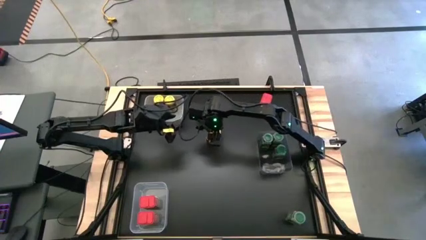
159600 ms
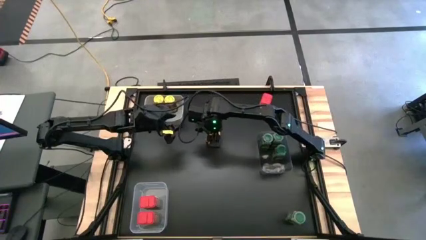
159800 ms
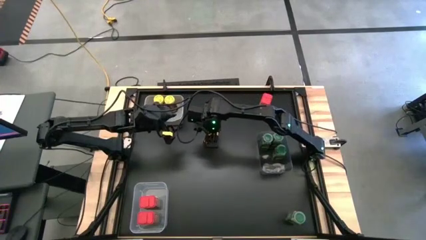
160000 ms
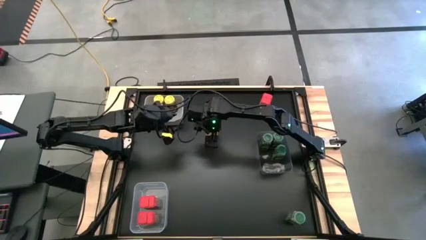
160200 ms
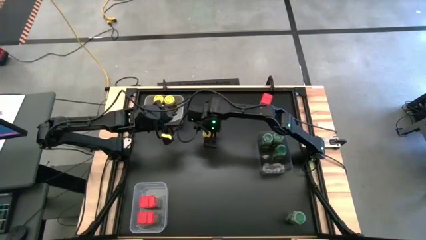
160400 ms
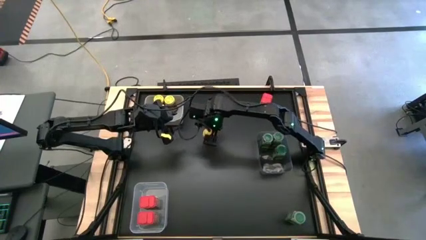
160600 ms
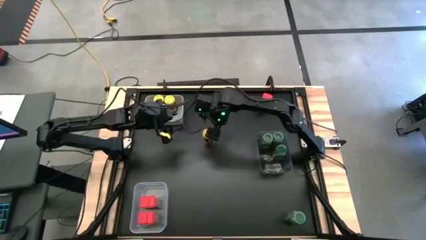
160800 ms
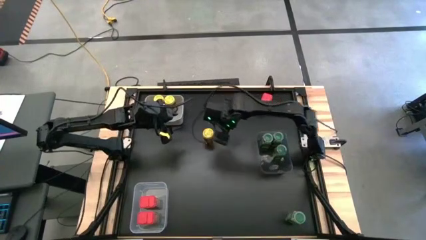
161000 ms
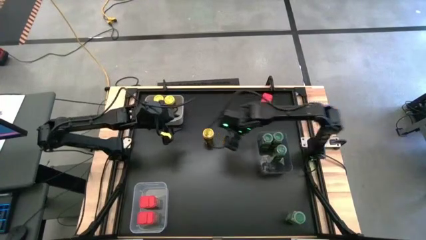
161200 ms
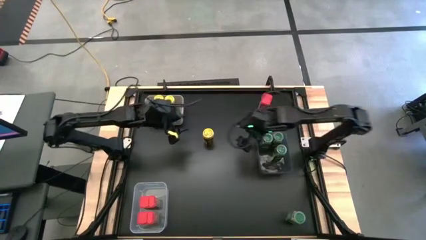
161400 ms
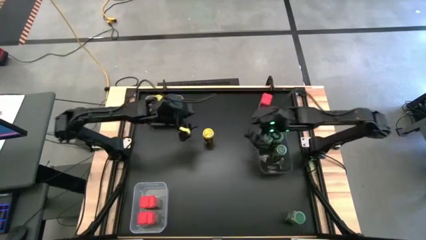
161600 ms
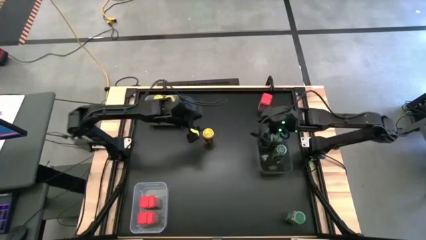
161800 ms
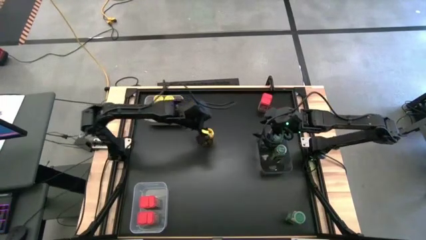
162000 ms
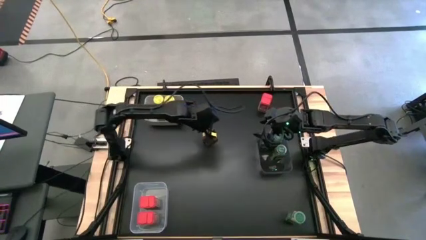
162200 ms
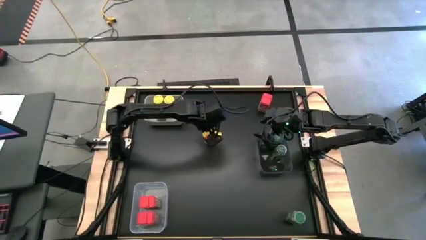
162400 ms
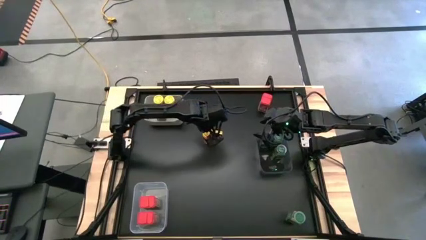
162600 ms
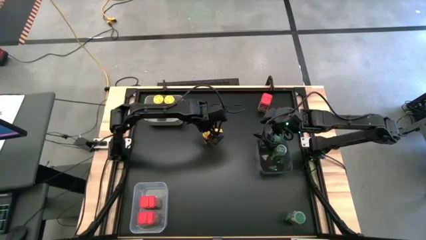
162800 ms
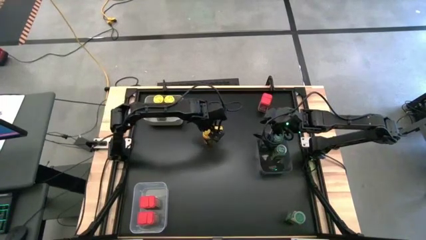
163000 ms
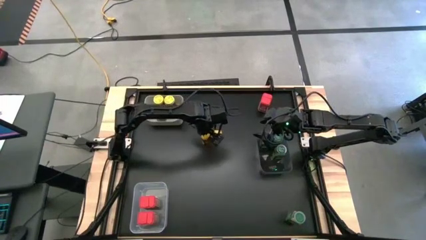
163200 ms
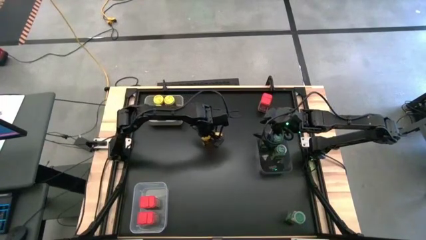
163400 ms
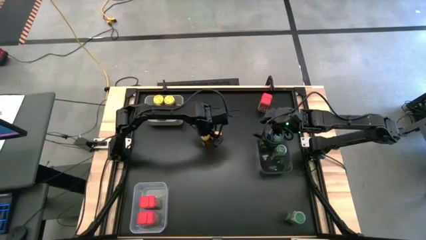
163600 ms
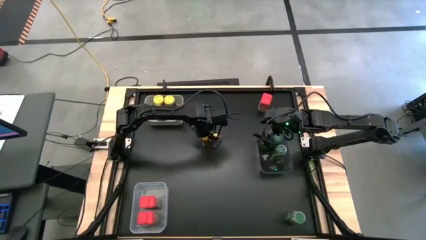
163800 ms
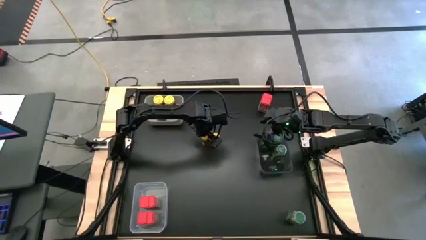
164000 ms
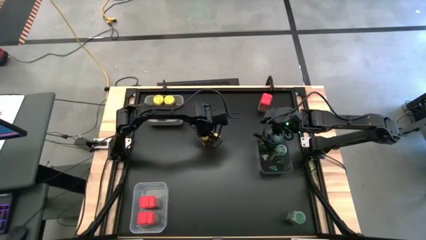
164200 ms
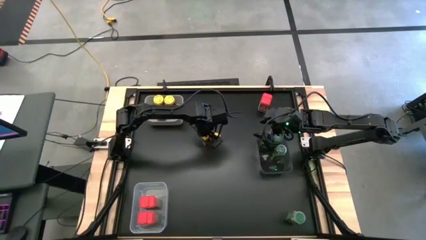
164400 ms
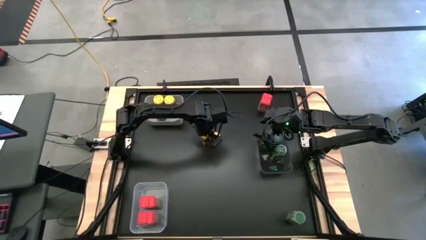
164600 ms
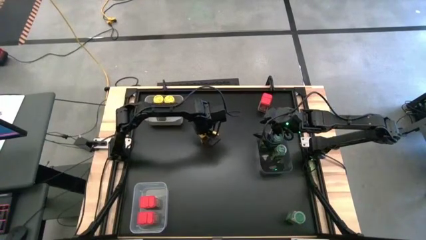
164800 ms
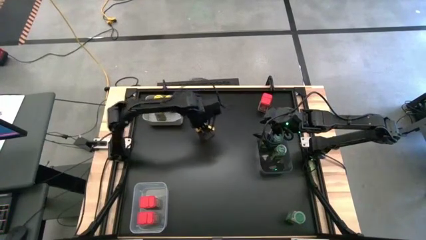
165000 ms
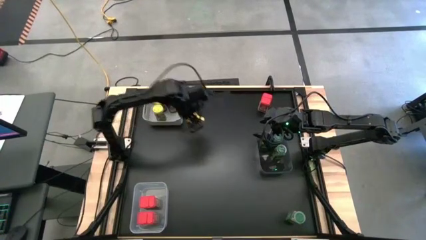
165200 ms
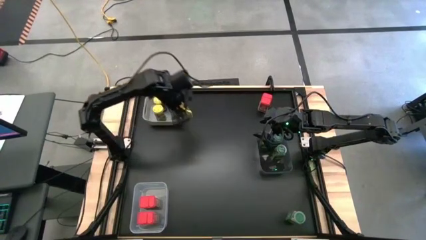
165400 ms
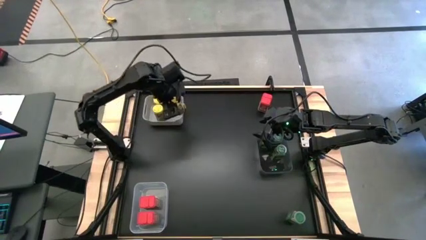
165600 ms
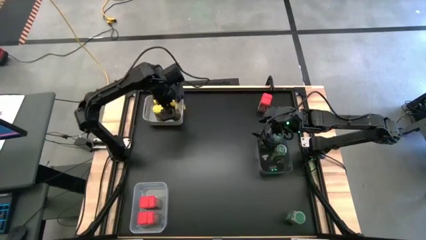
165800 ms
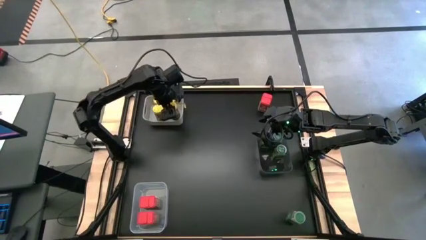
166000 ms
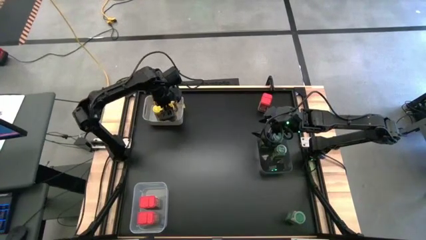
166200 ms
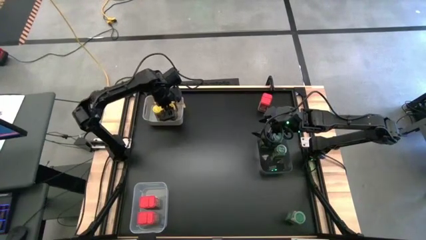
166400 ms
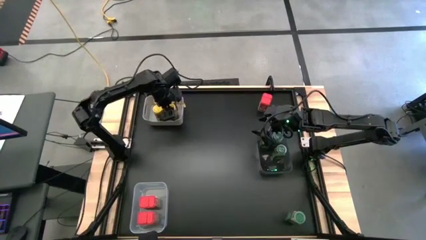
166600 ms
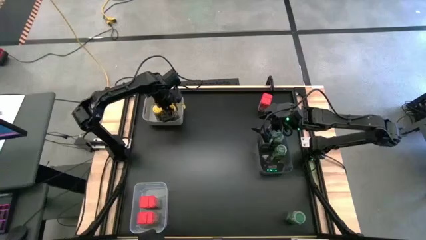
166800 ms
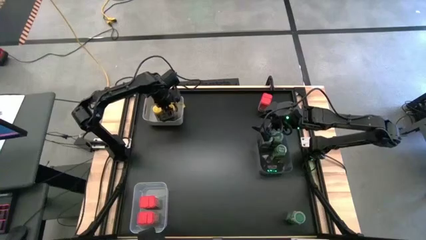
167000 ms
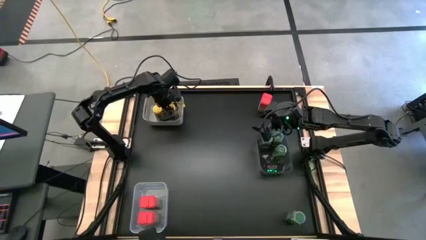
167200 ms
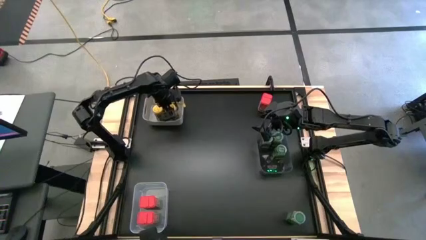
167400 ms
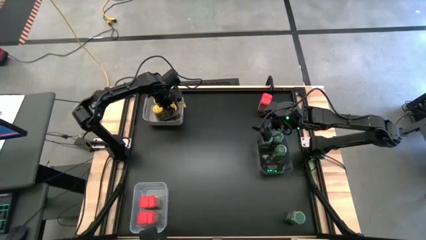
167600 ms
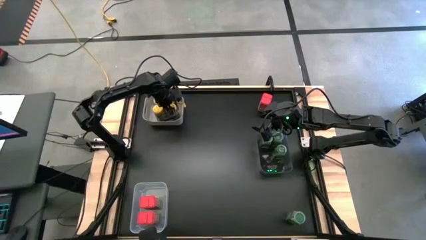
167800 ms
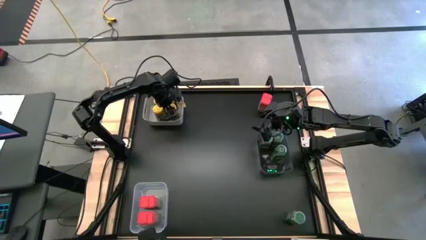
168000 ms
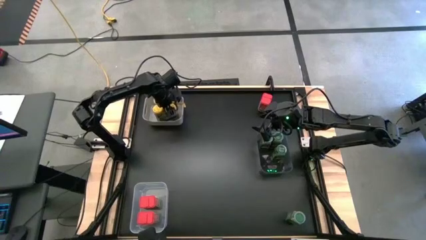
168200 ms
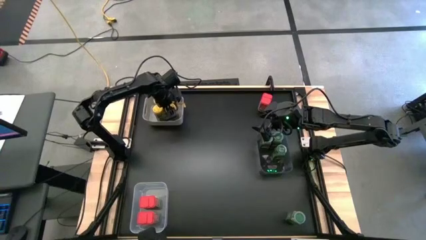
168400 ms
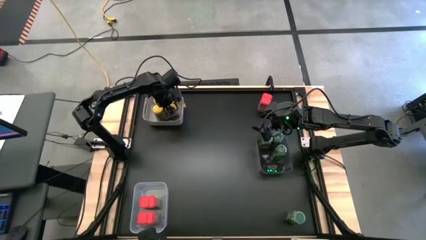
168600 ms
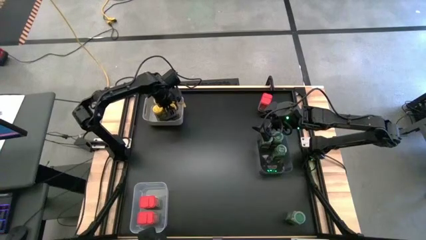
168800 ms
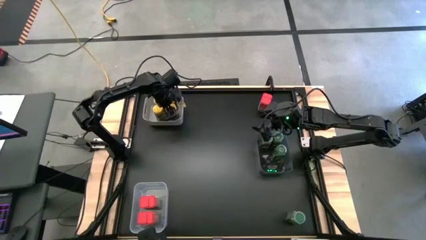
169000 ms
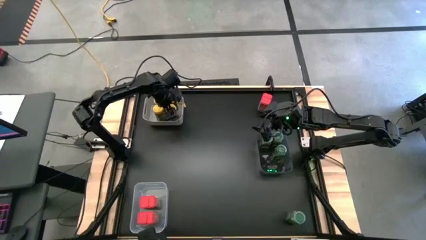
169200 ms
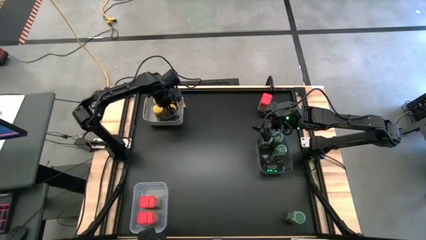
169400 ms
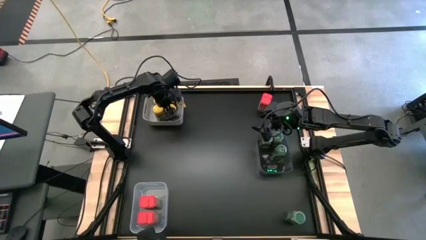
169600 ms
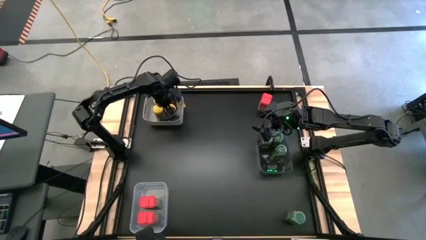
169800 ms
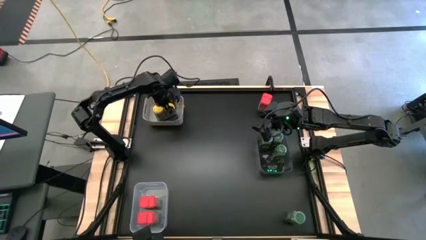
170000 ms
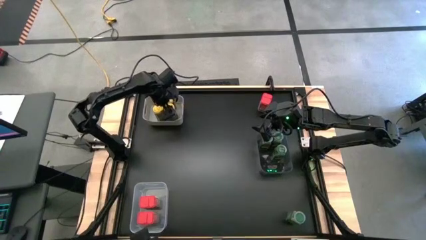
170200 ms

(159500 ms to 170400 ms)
Task: Sort spices by type
Put the yellow seasoning bottle into the gray bin

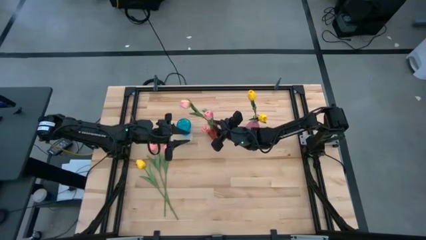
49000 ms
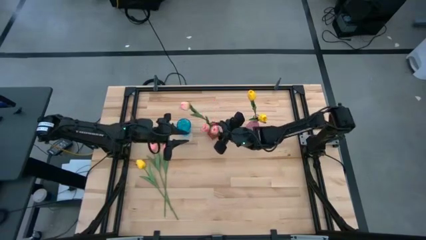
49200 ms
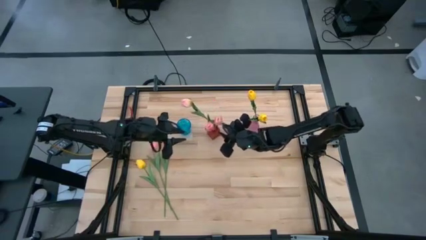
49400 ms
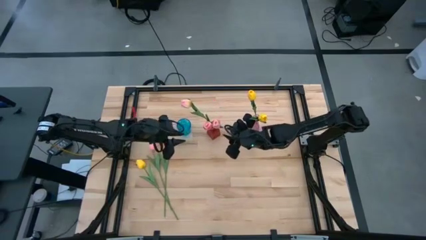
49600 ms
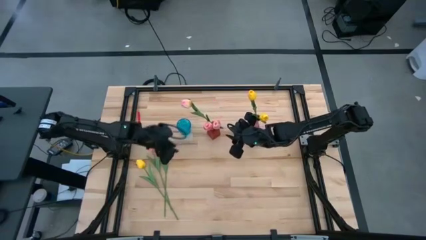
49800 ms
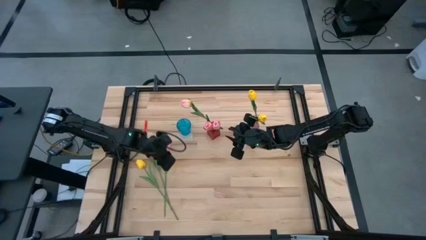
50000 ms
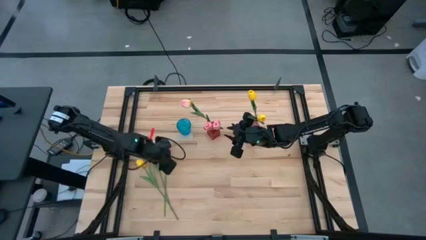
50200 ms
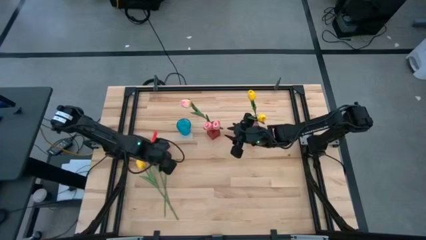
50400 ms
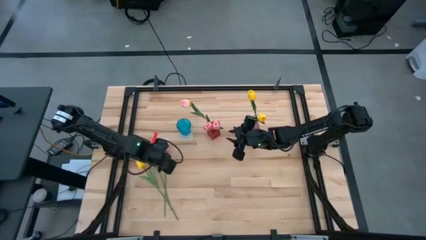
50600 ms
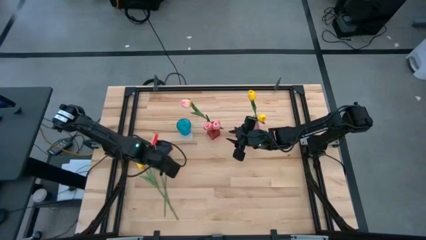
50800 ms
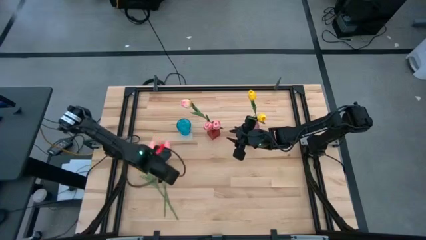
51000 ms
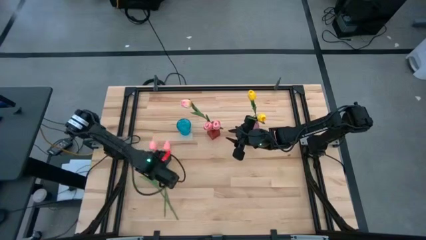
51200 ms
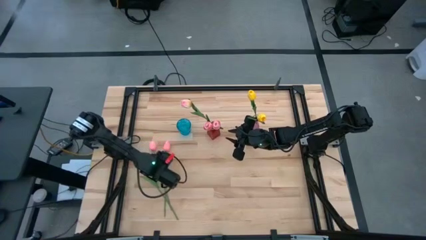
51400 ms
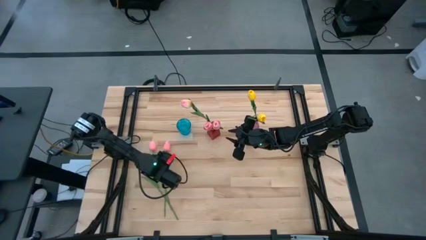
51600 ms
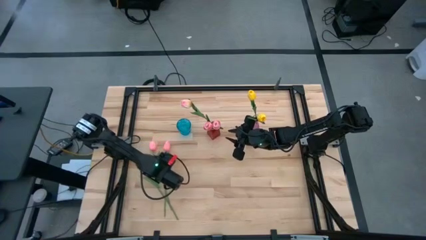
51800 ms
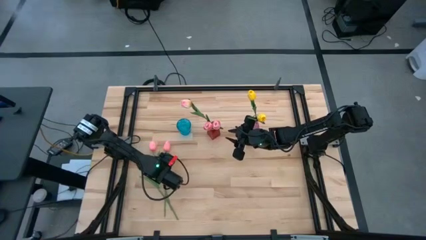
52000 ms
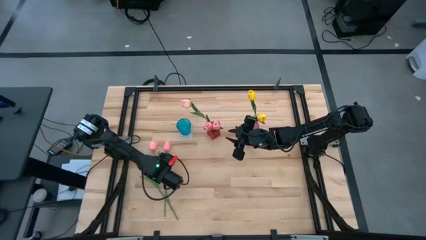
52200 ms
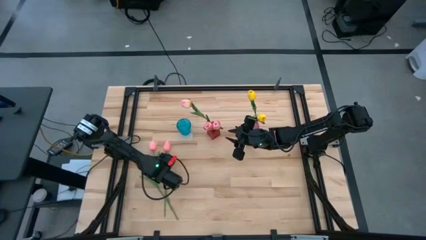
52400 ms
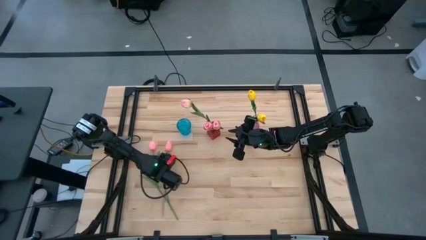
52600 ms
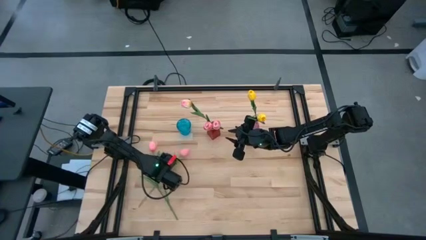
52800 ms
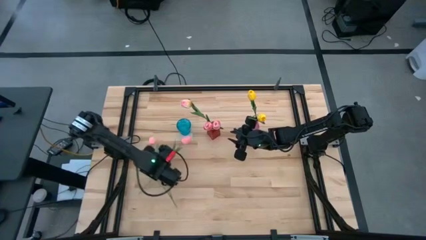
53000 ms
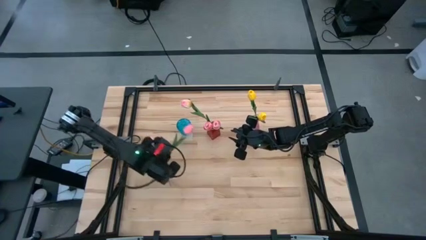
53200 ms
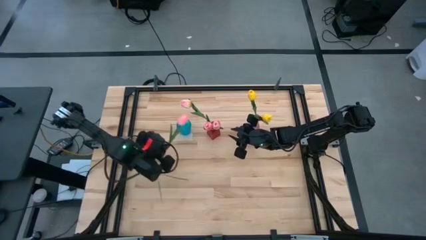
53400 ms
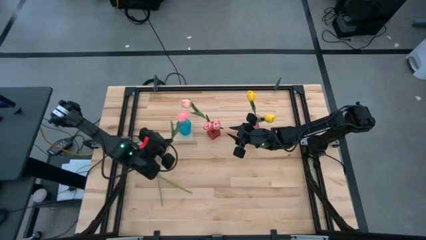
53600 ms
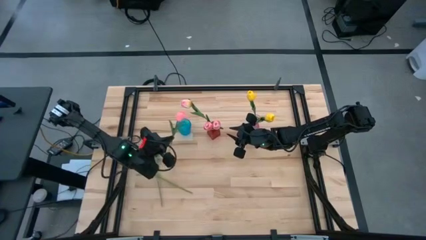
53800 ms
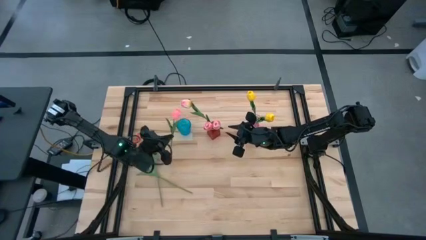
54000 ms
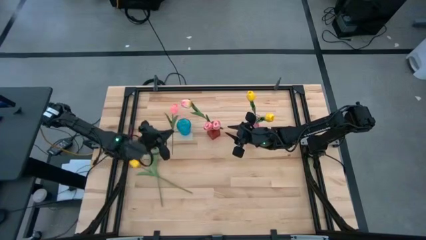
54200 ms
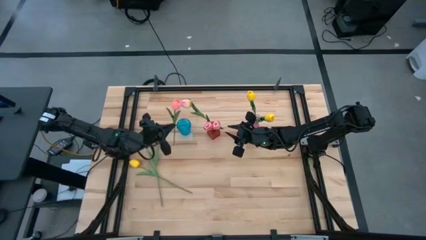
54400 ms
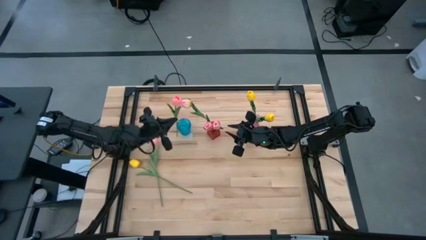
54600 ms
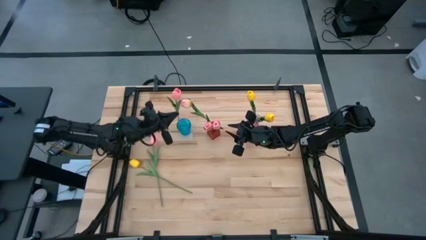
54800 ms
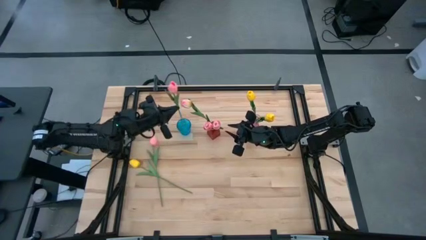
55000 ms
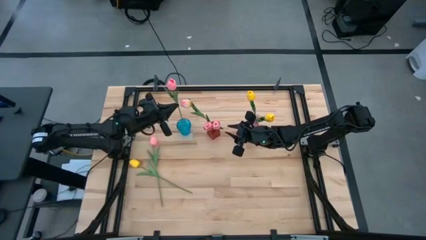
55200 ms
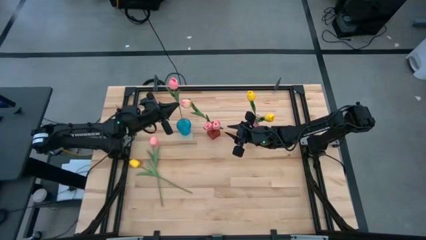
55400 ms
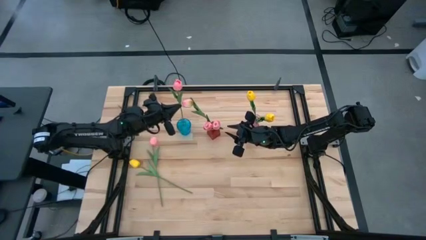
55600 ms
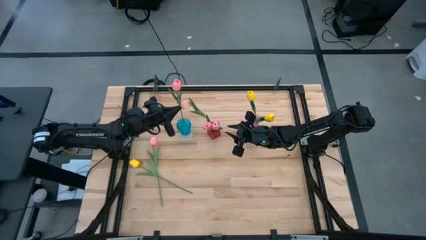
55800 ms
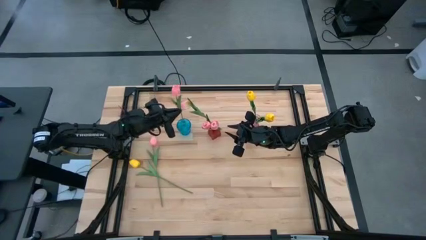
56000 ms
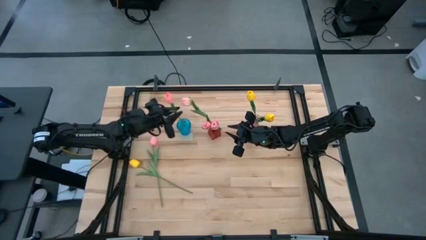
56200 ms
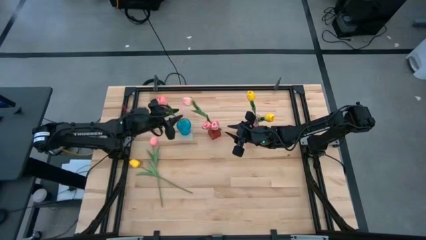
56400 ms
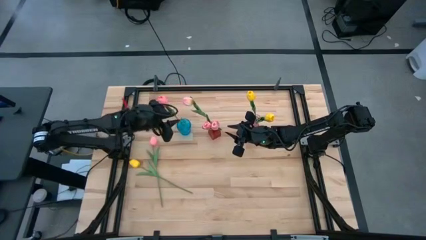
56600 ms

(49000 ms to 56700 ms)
Task: Sort flowers into vase by color
Put the right light pink flower into the blue vase
